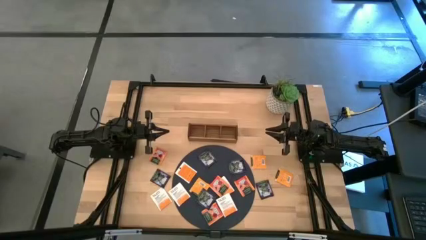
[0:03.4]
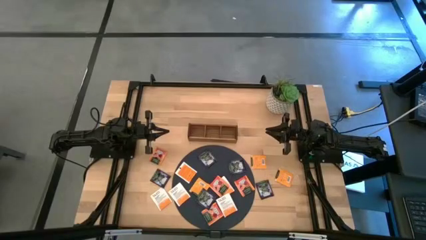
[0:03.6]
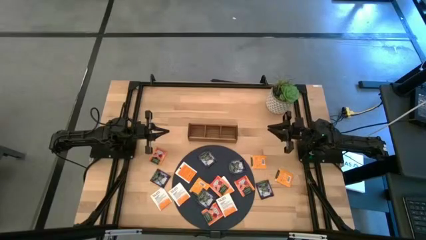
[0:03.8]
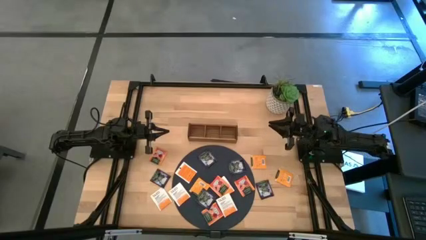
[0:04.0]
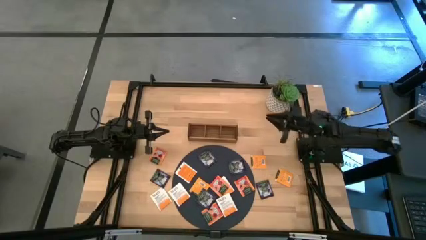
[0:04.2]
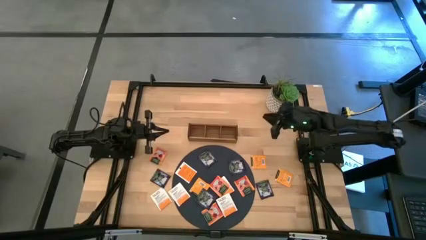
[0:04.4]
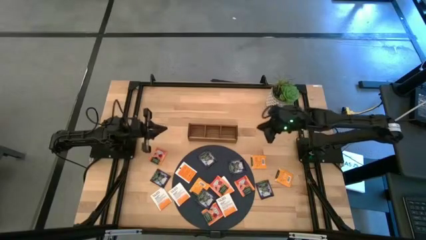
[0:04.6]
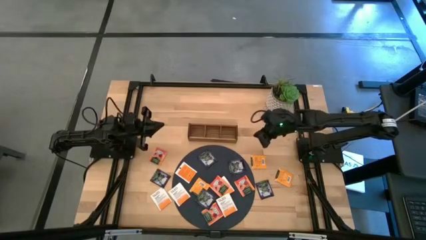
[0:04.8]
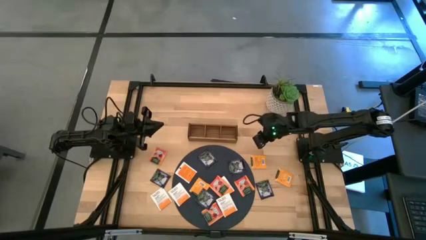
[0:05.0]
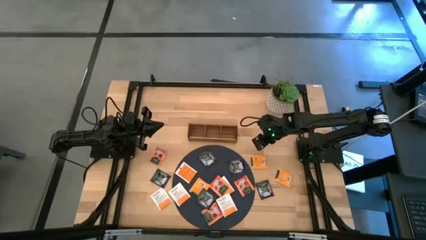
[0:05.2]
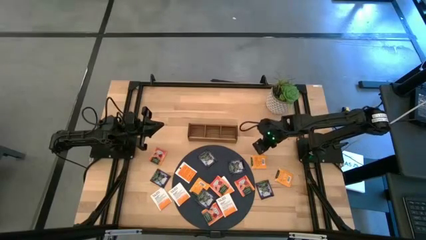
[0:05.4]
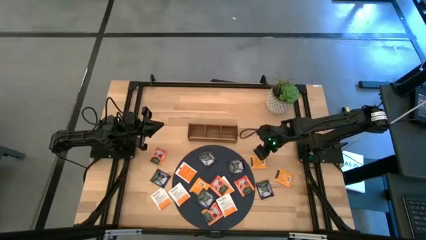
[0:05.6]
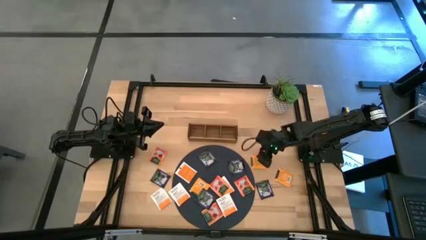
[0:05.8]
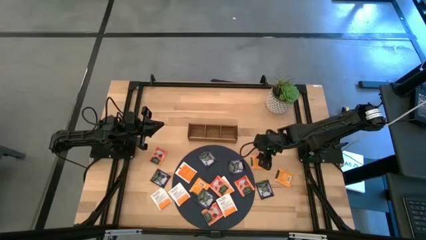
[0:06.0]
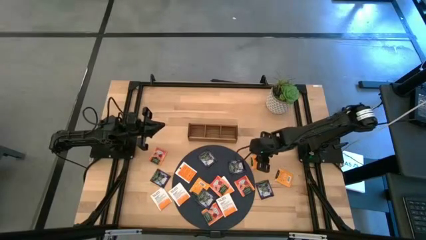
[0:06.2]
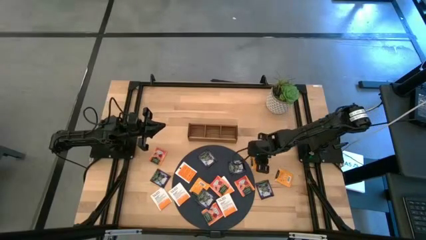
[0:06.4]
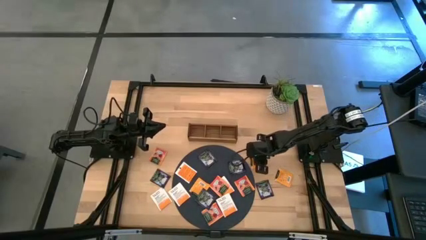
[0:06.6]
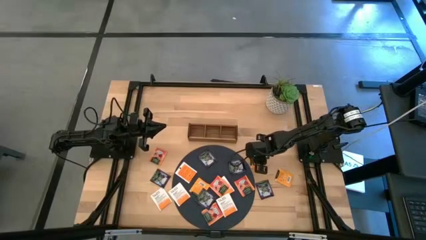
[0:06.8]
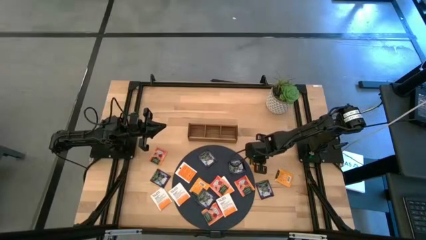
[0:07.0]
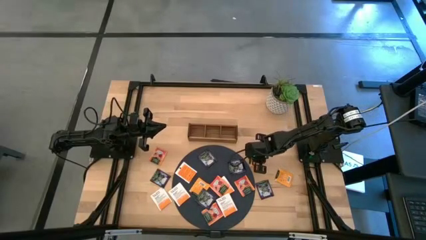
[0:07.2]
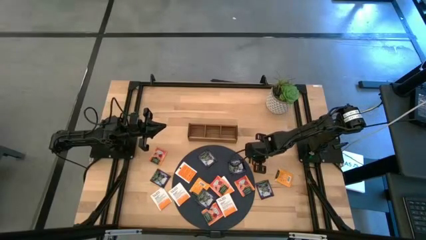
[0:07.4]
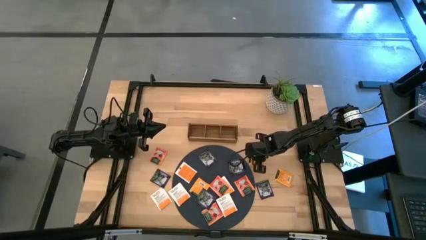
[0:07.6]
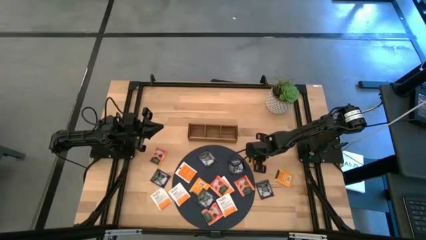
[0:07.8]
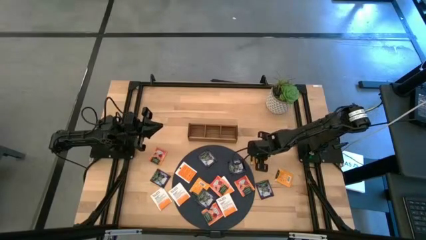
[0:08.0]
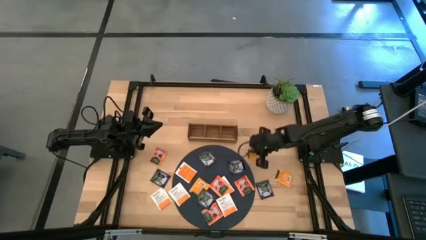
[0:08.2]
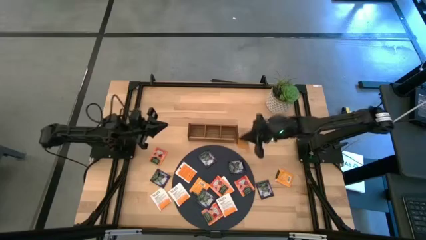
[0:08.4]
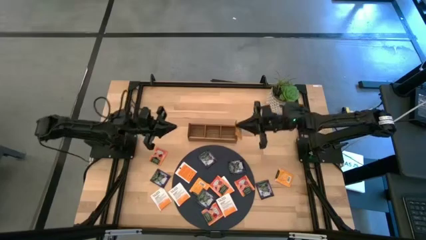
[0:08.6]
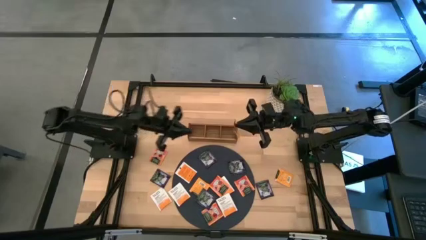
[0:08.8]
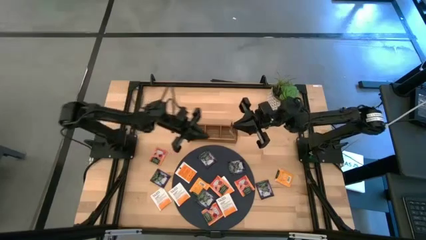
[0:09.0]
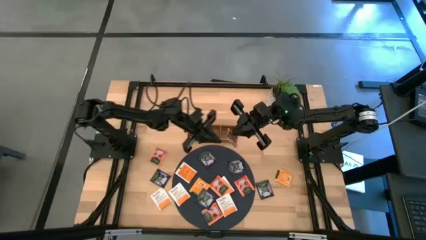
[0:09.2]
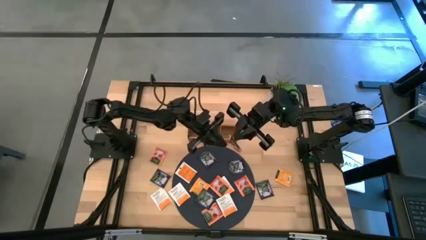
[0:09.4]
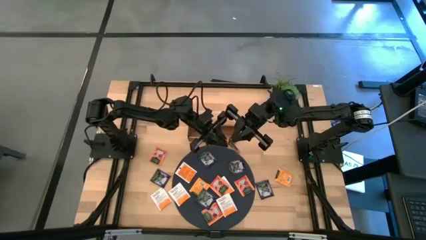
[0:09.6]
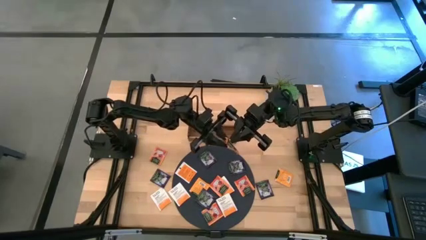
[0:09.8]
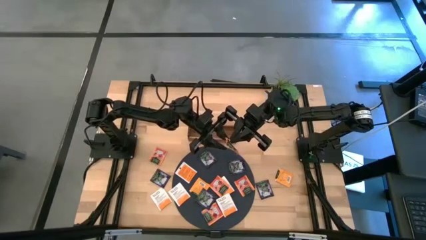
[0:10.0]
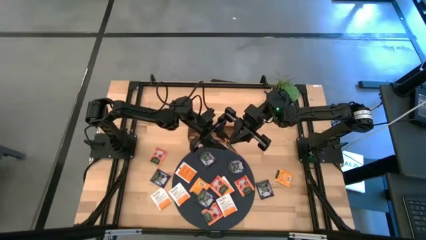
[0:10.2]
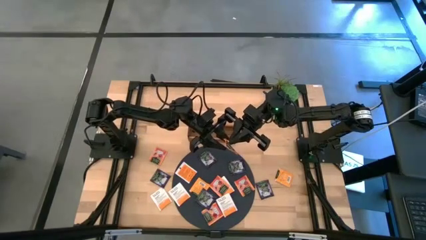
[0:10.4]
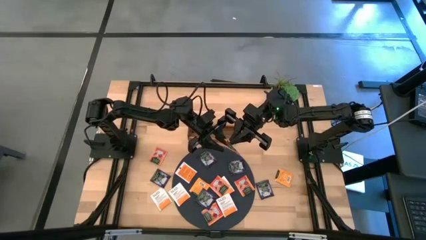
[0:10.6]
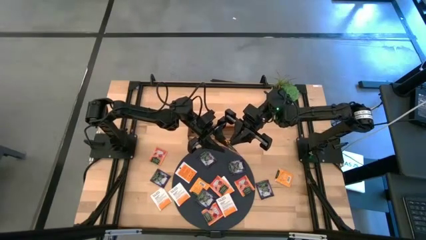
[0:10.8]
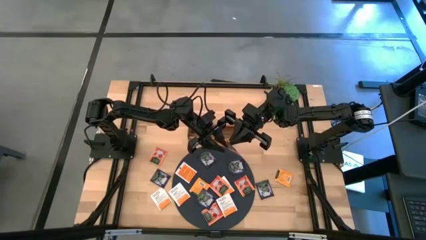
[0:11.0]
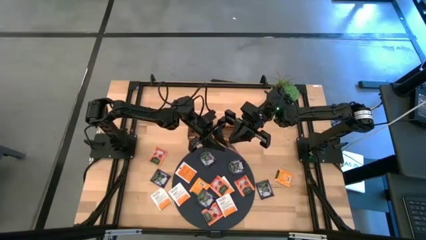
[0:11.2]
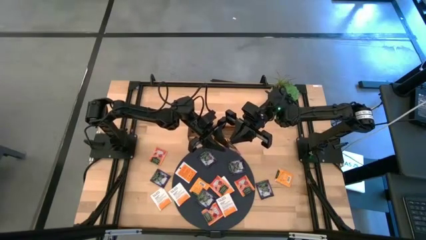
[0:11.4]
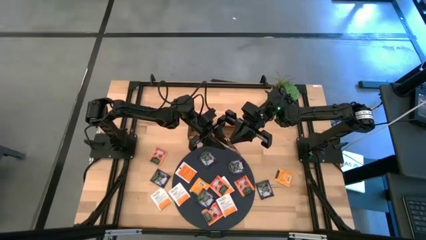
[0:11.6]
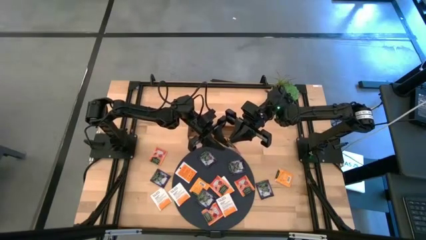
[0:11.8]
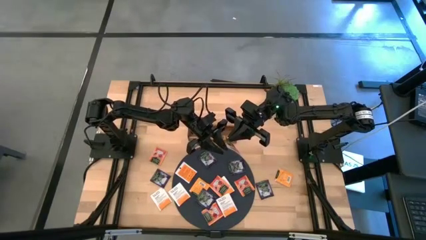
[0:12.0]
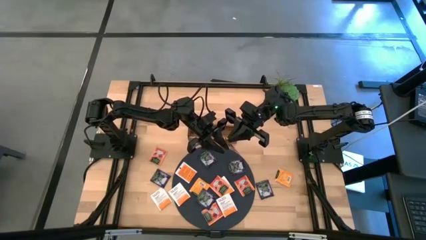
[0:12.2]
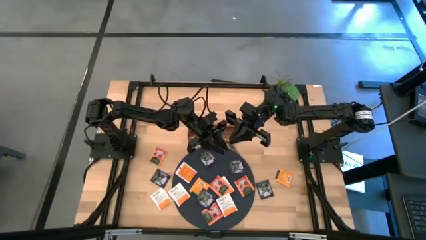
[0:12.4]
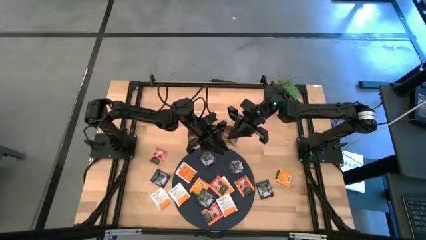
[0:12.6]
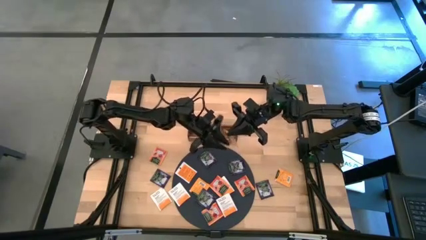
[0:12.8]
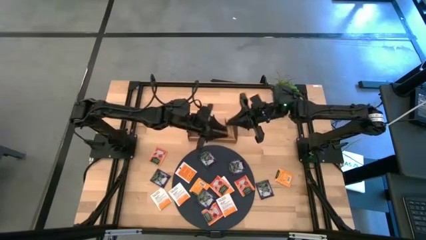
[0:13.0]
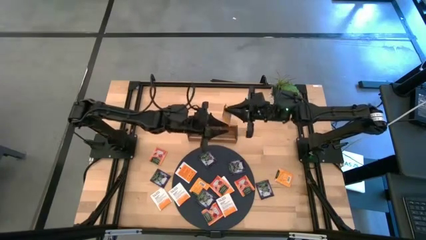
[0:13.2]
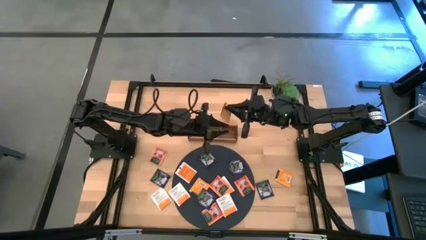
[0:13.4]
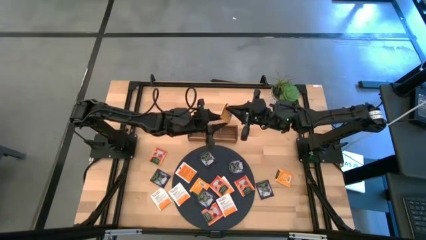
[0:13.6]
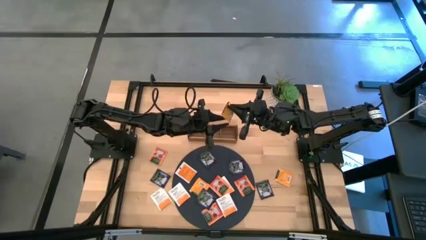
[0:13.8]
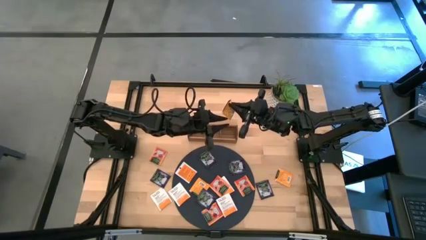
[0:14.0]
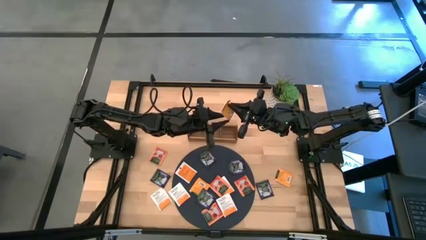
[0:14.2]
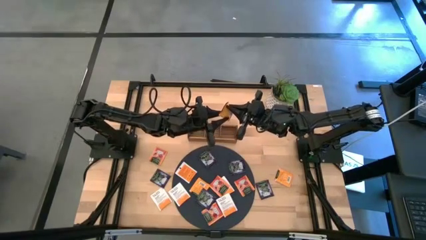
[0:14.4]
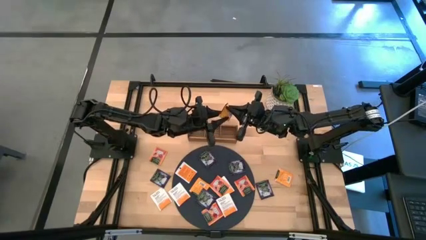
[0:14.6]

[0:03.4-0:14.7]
Task: Pick & Place Tea
Put the orange tea bag into the right of the wooden organizer

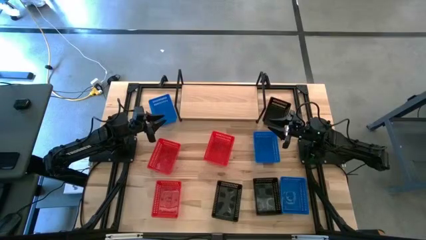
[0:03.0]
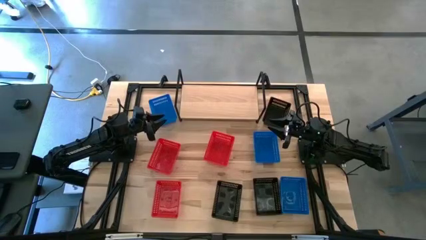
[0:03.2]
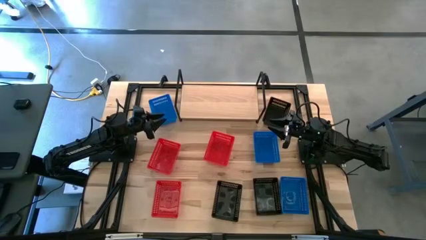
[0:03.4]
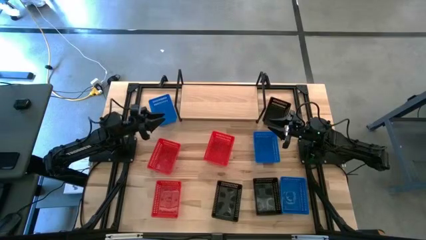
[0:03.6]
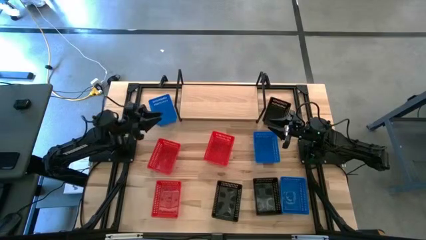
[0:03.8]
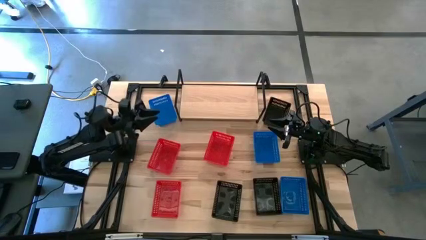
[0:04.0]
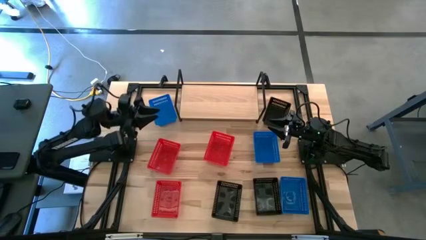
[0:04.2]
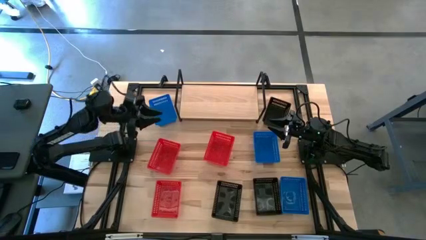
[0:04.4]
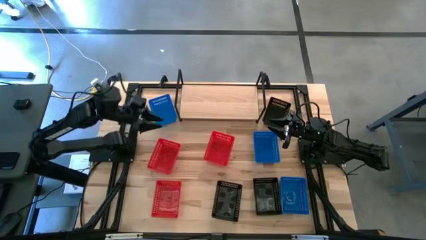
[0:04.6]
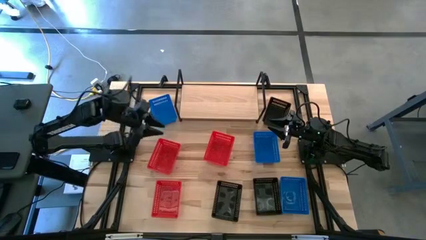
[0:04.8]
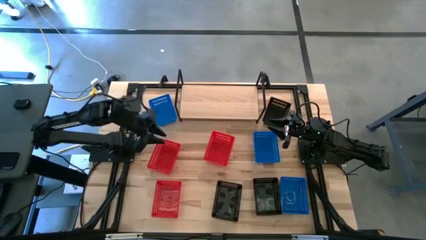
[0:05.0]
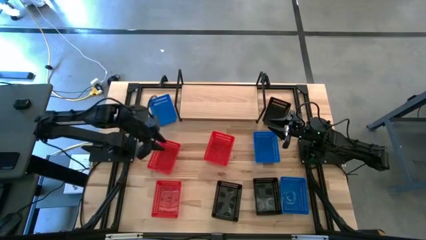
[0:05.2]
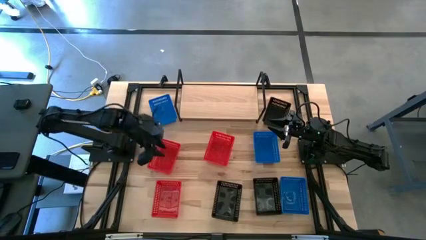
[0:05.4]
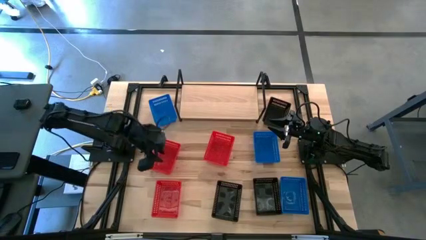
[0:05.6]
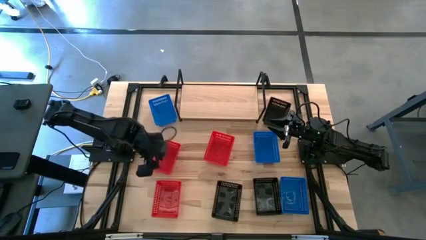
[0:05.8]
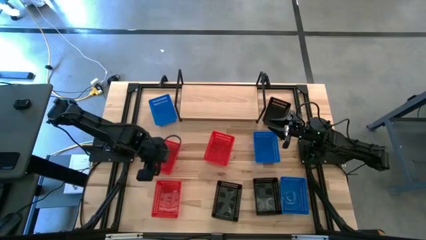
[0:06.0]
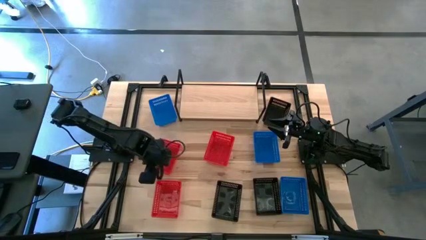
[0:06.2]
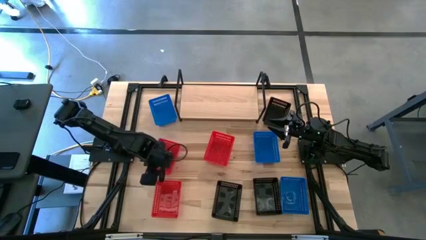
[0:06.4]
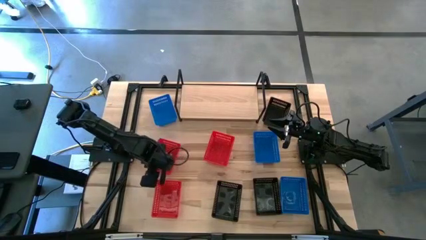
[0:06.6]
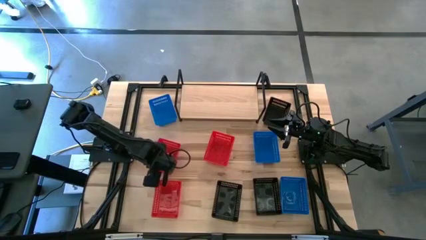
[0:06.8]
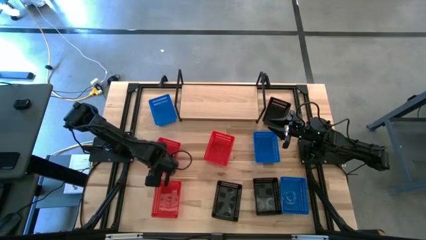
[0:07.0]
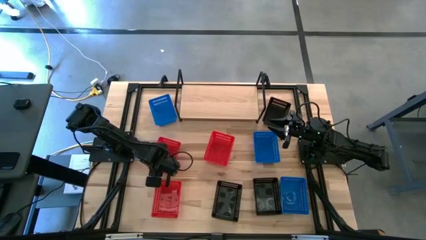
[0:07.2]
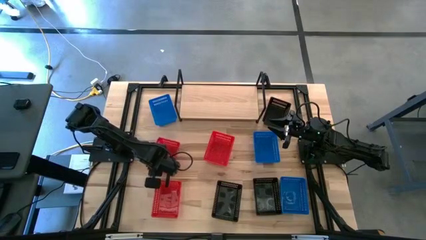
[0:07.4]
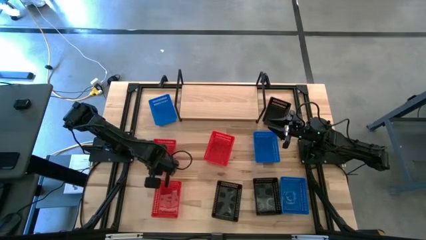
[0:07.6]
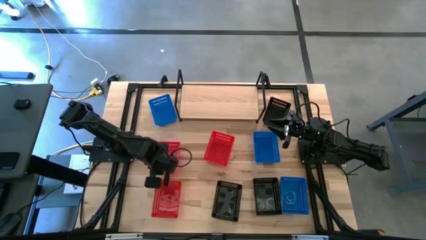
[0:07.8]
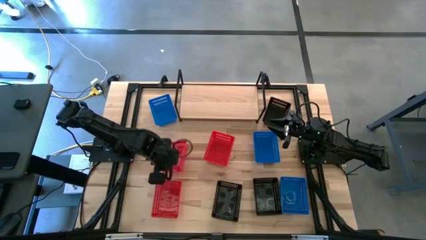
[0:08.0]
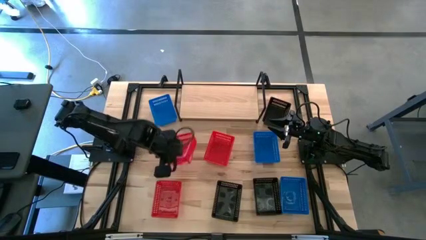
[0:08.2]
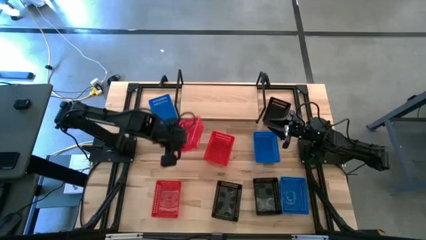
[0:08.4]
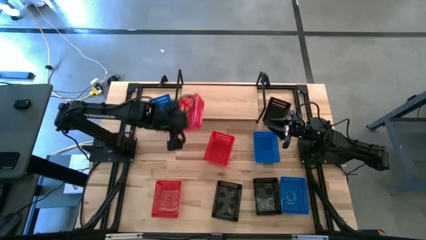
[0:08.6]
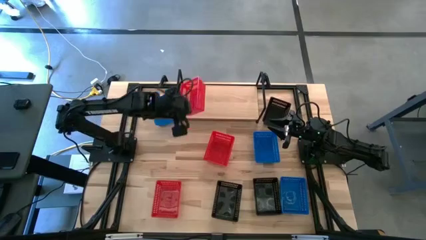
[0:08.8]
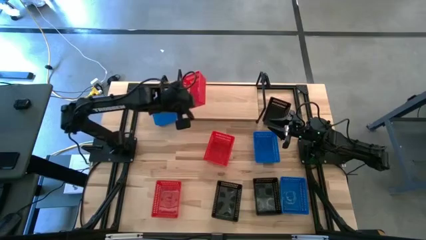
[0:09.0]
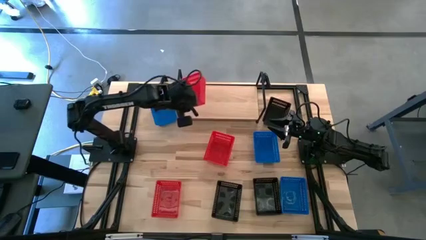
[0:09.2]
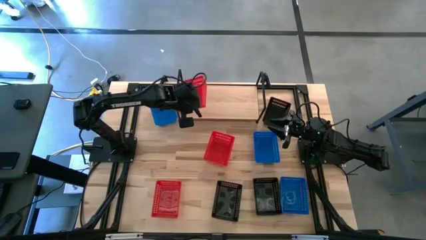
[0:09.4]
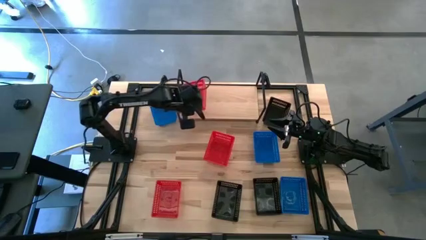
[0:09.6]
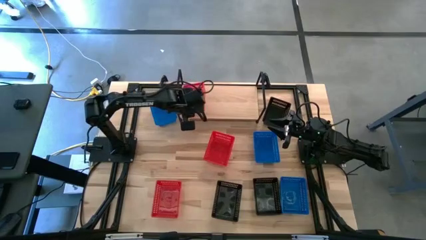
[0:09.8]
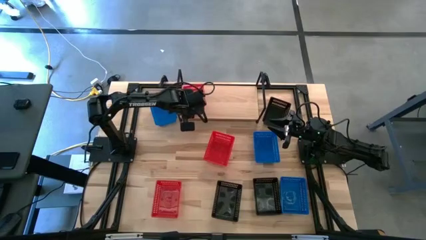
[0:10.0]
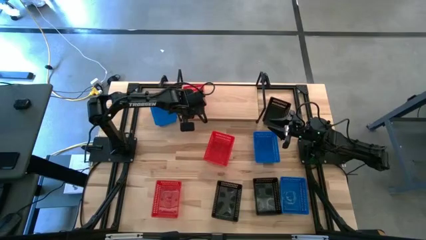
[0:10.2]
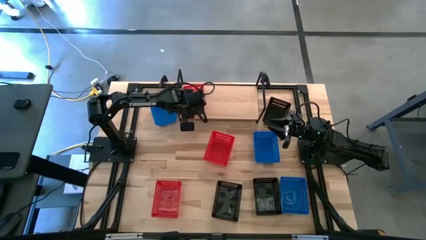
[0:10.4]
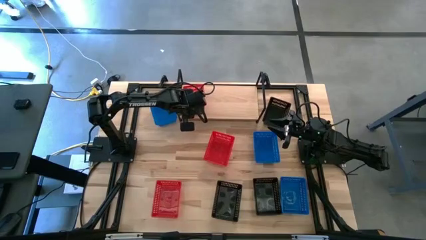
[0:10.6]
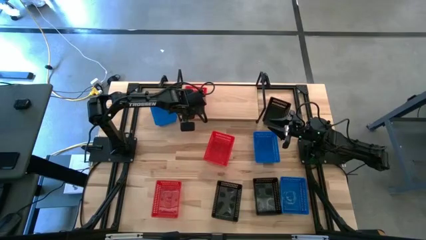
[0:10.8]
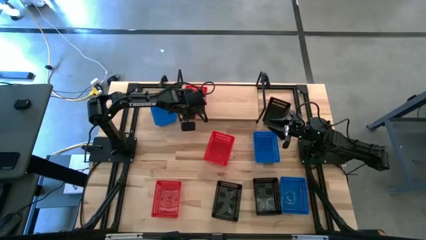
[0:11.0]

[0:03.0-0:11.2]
Task: Stack baskets on shelf by color
Put the top left red bin on the shelf
